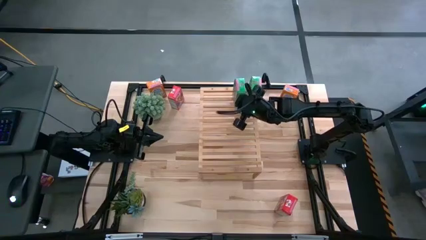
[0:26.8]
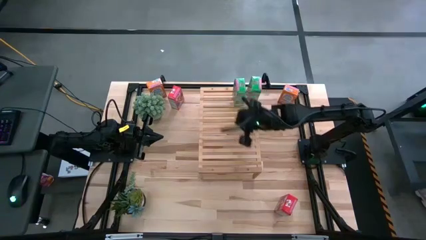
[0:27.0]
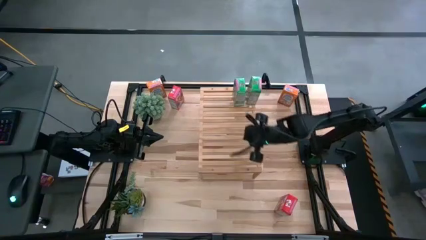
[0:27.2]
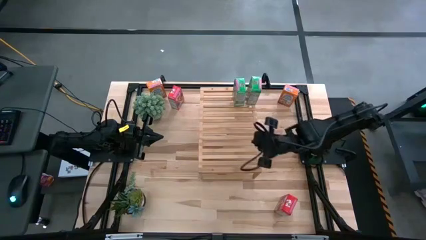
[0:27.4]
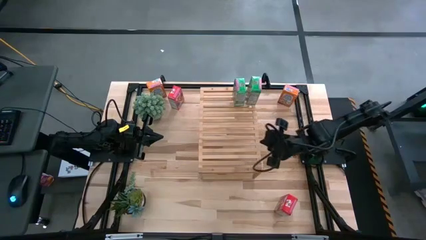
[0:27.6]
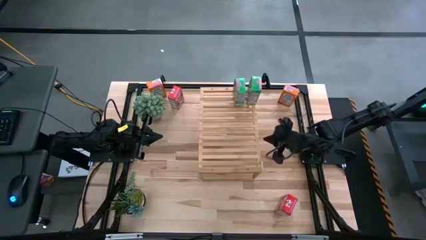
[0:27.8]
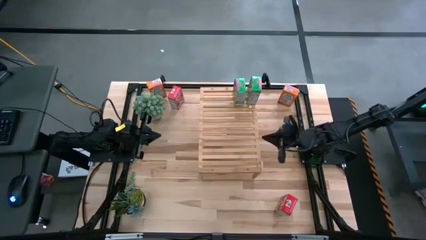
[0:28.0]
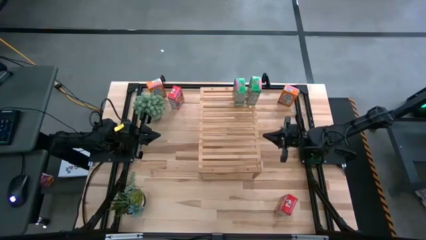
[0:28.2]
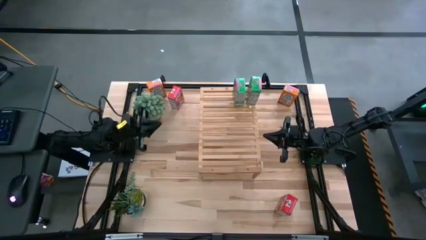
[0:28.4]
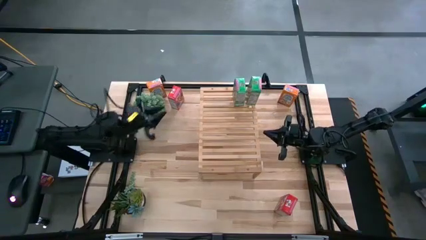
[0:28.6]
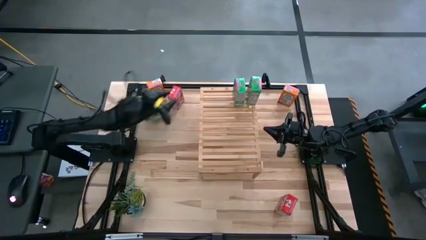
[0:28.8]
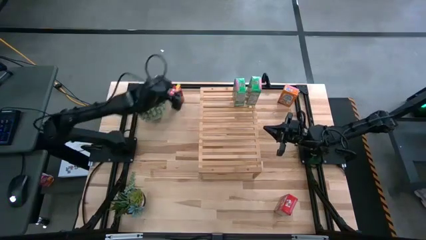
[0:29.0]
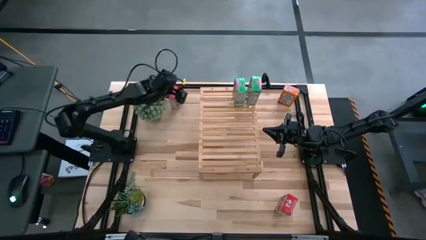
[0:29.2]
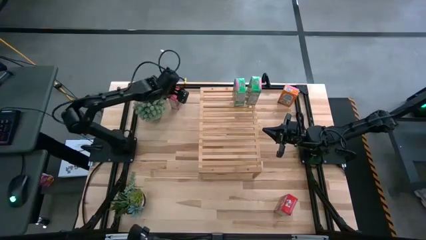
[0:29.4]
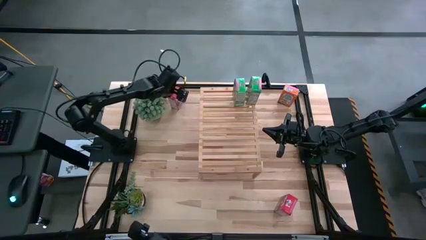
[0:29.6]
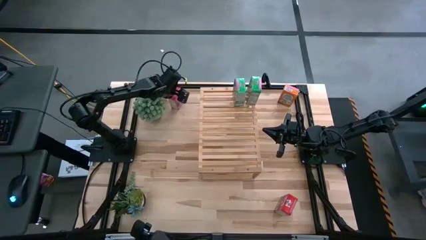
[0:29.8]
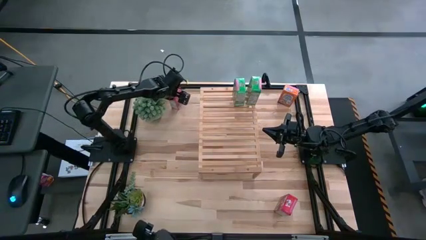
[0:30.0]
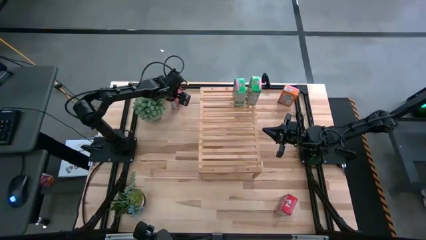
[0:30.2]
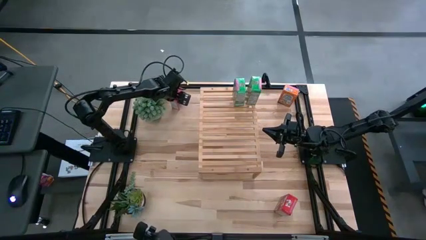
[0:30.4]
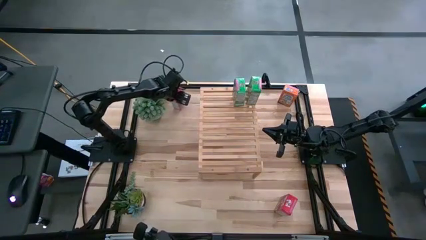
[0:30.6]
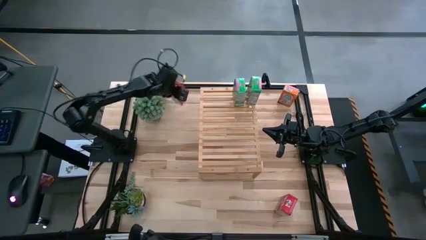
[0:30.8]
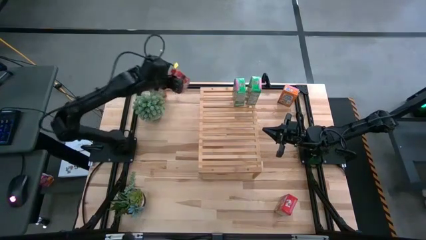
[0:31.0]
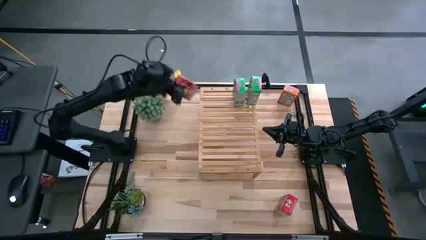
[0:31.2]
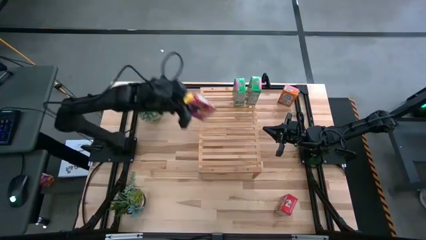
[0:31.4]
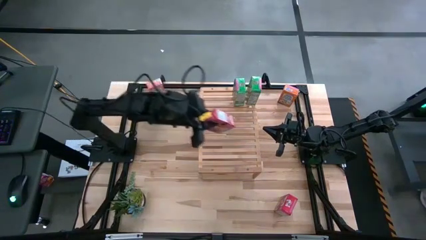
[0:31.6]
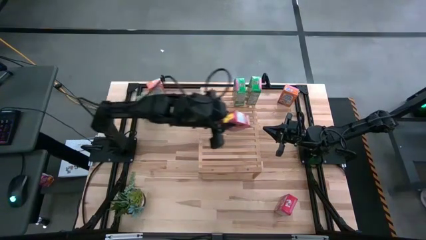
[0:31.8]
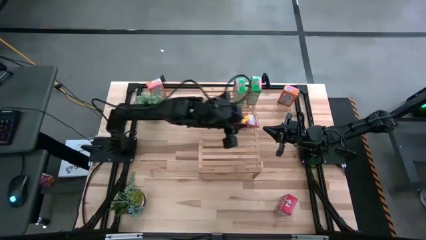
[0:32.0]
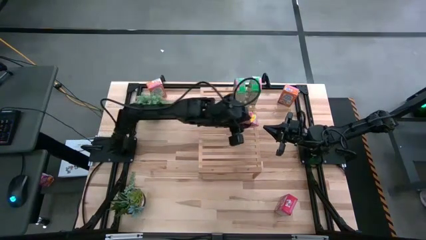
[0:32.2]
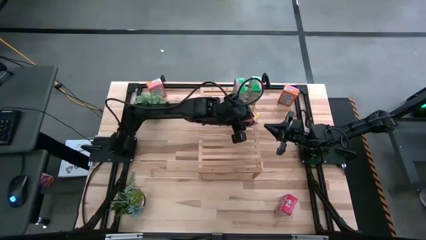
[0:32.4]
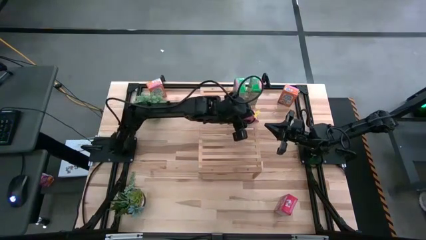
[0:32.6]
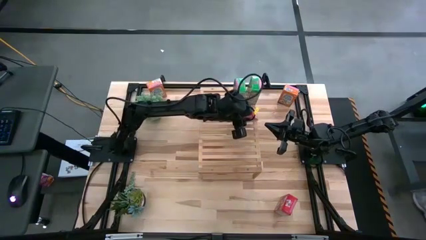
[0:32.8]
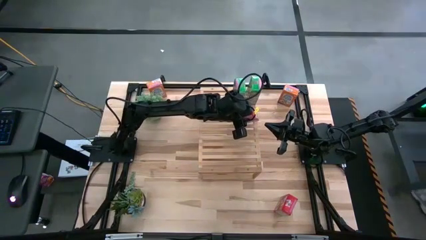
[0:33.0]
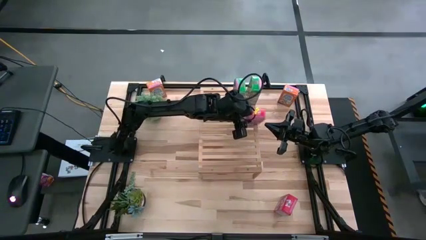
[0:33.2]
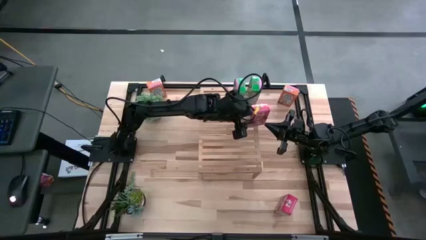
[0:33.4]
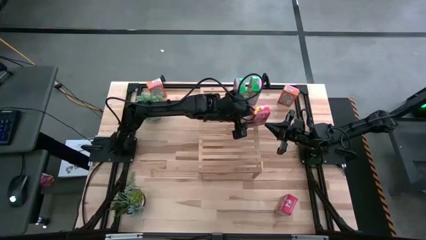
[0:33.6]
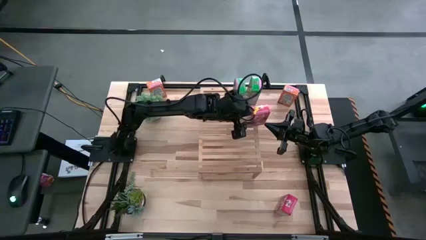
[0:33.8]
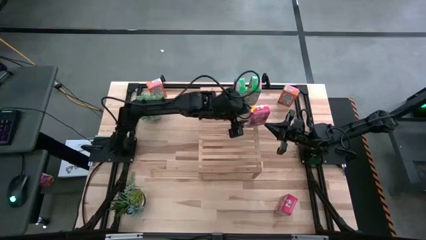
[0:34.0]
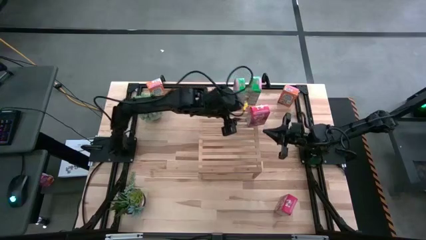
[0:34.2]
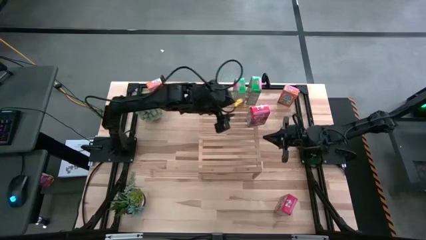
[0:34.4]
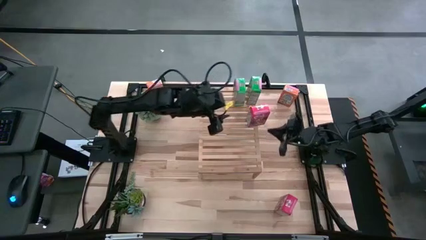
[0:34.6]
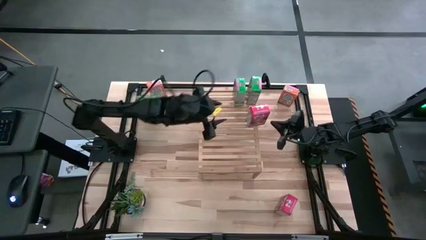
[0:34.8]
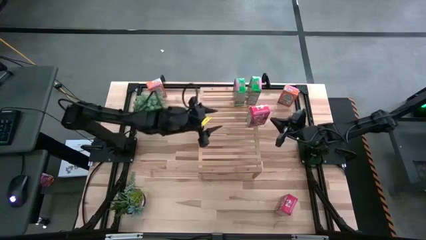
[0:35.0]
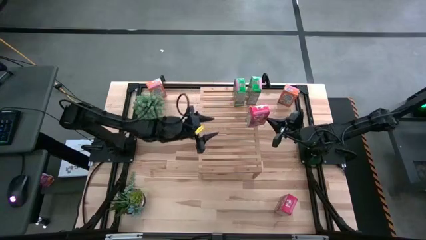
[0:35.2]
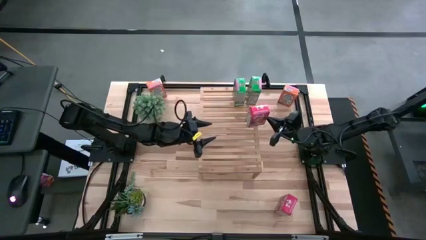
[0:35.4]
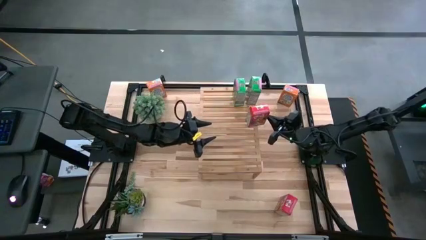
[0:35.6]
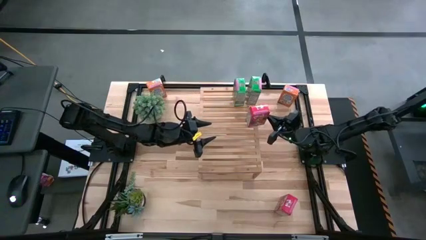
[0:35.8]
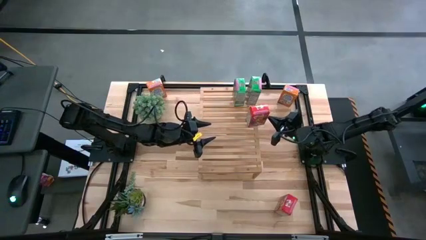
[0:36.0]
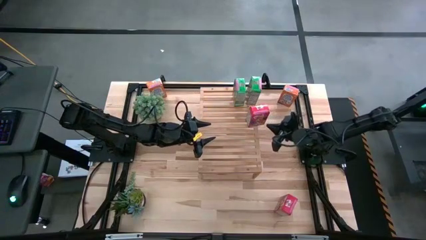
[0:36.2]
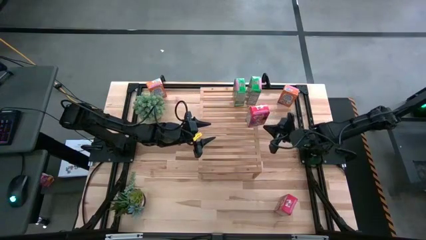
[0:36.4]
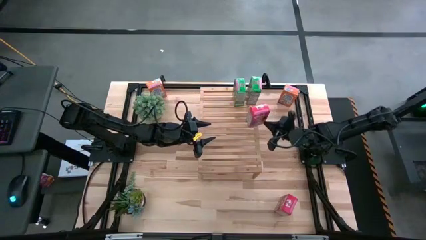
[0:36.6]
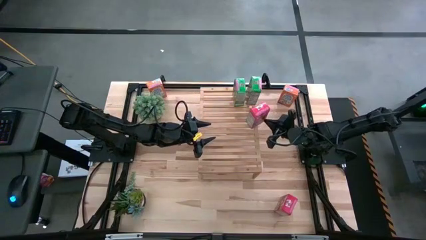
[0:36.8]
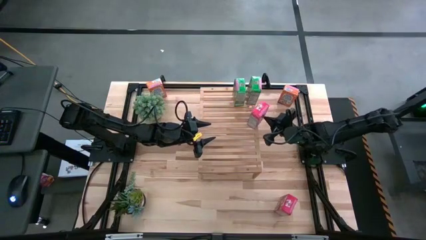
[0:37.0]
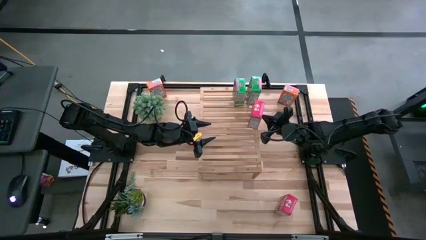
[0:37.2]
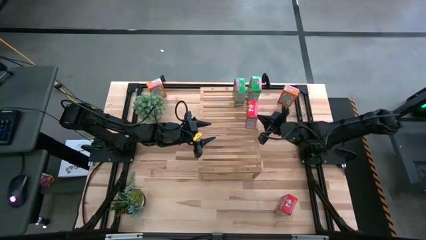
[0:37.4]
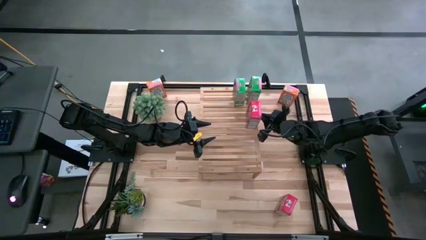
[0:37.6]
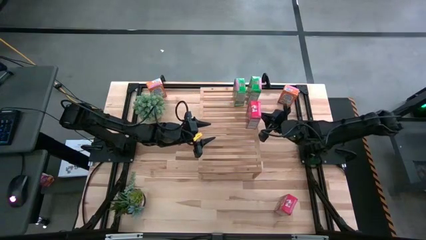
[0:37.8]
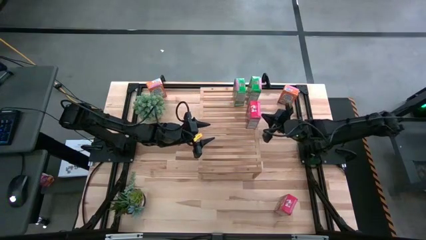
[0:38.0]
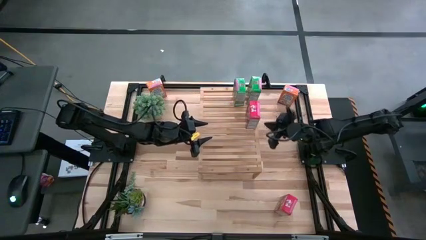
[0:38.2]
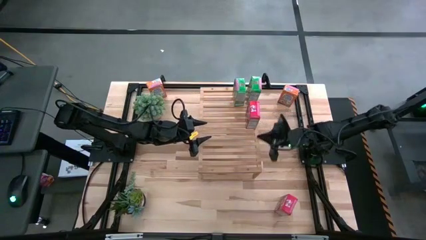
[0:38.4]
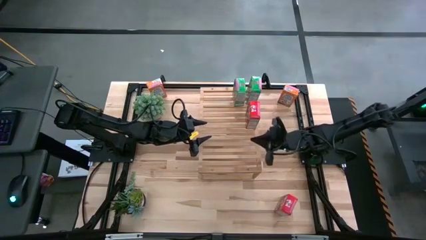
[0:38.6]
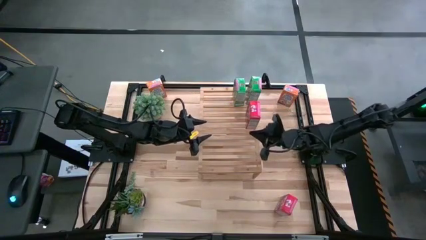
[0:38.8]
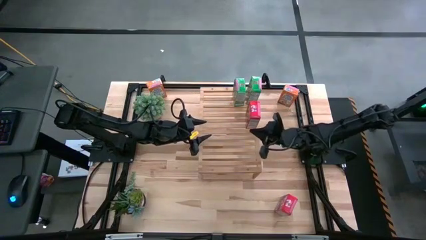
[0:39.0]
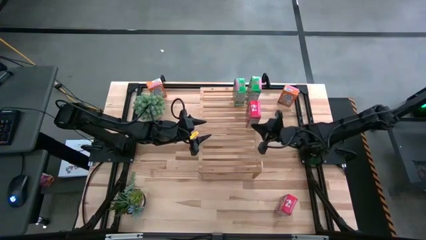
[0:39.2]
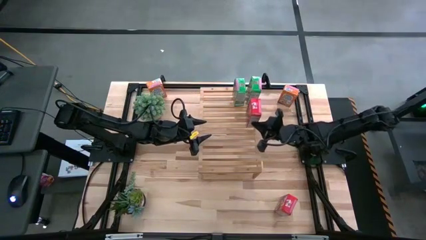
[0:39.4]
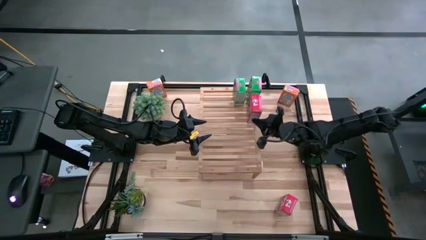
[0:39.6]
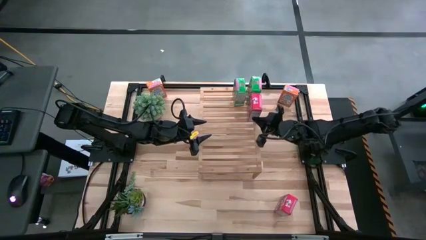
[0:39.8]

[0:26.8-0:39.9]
Task: Stack cereal on shelf
Put the top red cereal box on the shelf
